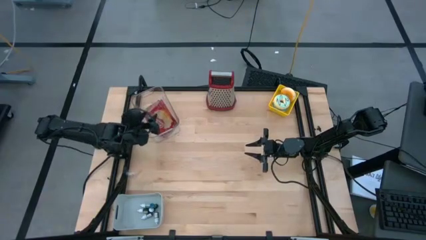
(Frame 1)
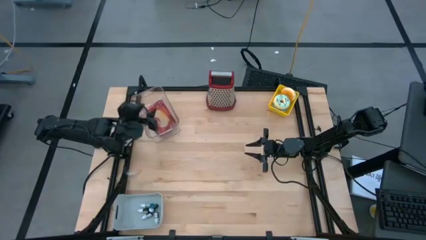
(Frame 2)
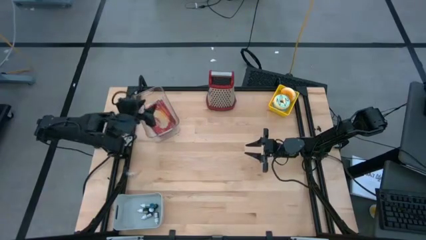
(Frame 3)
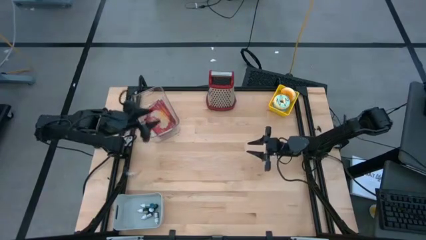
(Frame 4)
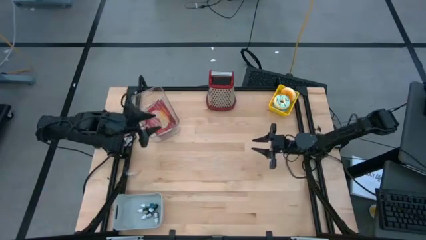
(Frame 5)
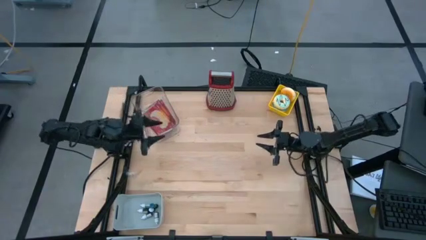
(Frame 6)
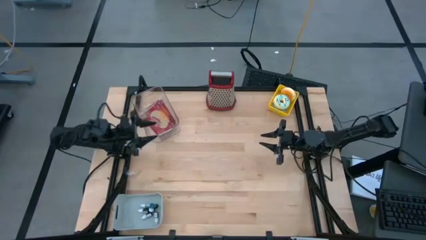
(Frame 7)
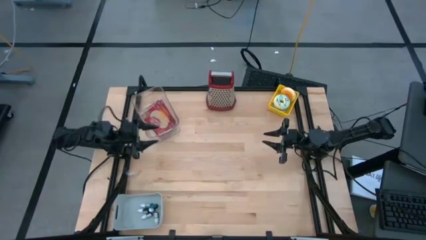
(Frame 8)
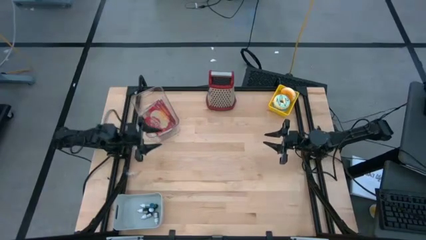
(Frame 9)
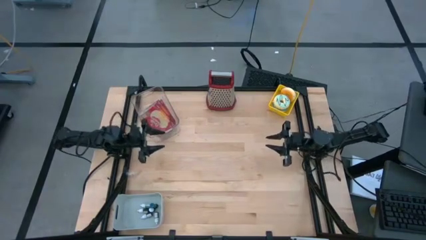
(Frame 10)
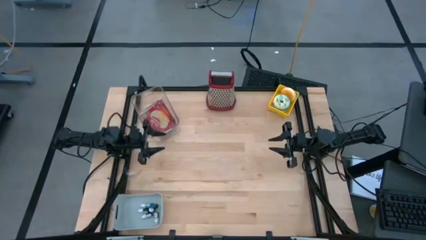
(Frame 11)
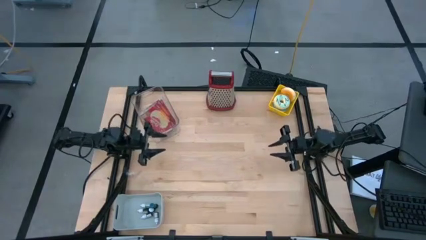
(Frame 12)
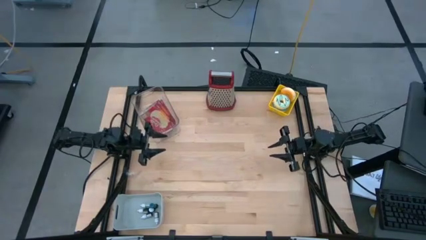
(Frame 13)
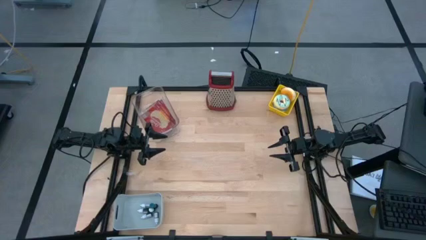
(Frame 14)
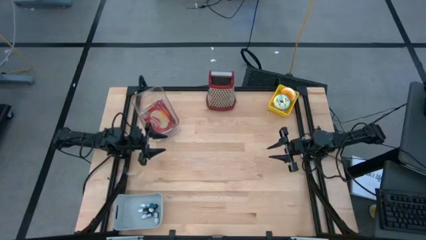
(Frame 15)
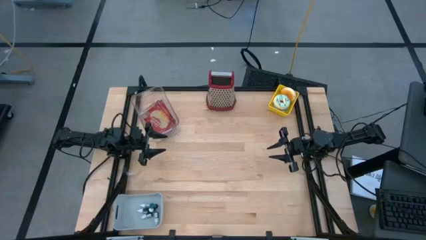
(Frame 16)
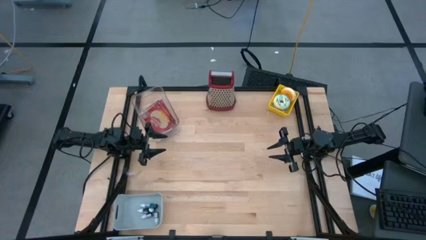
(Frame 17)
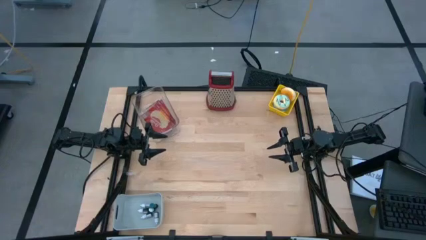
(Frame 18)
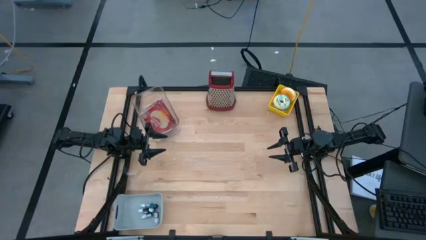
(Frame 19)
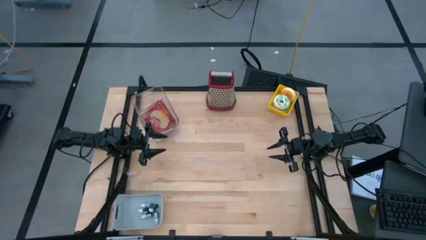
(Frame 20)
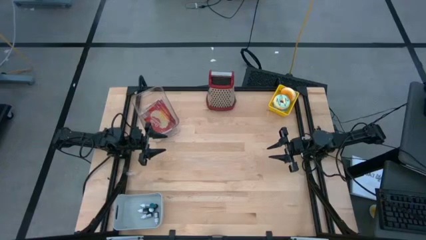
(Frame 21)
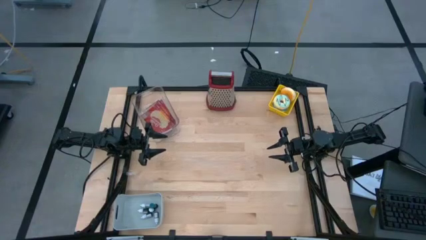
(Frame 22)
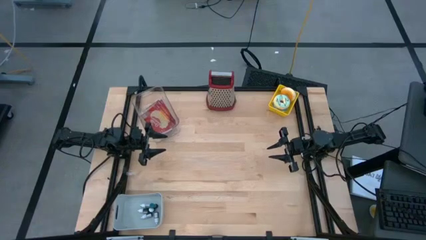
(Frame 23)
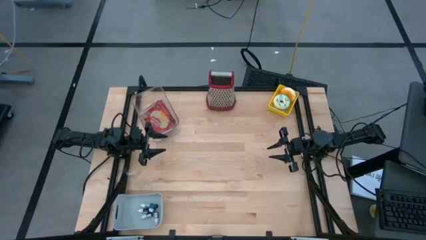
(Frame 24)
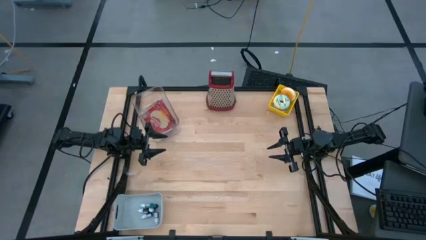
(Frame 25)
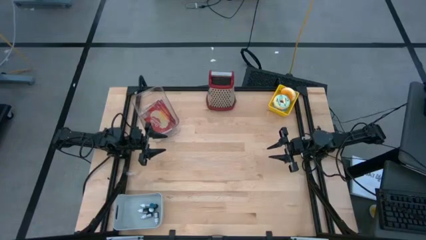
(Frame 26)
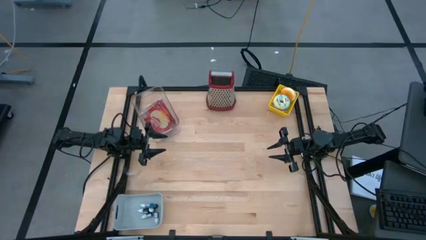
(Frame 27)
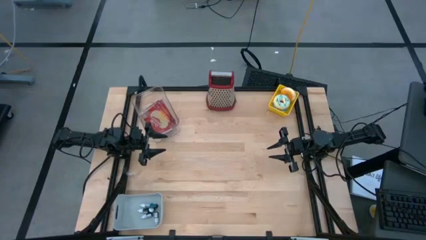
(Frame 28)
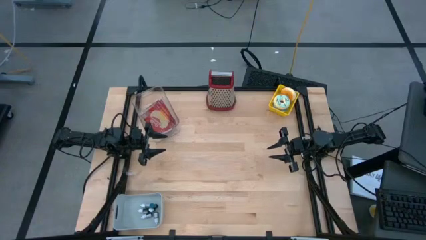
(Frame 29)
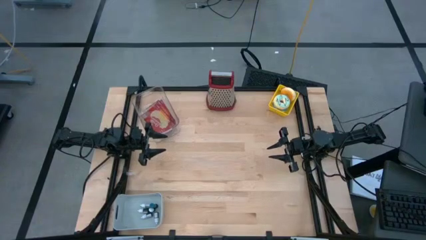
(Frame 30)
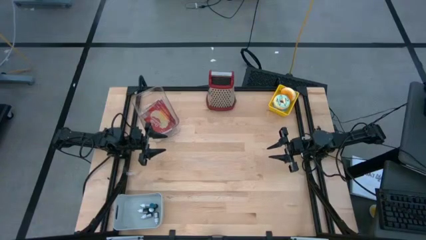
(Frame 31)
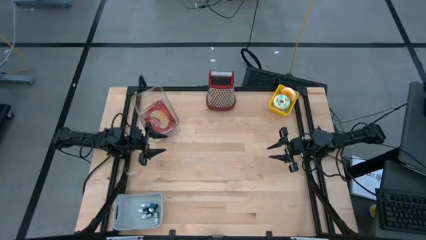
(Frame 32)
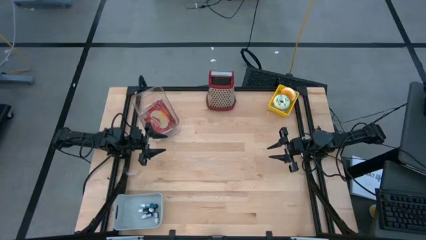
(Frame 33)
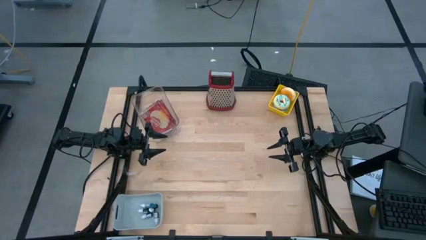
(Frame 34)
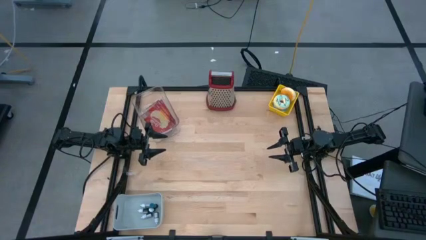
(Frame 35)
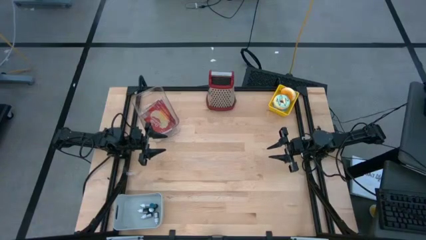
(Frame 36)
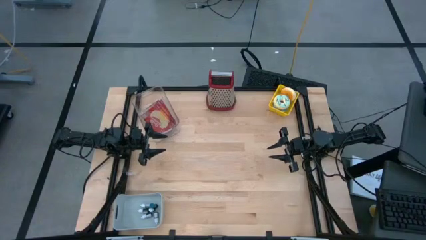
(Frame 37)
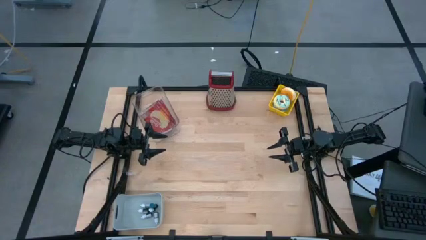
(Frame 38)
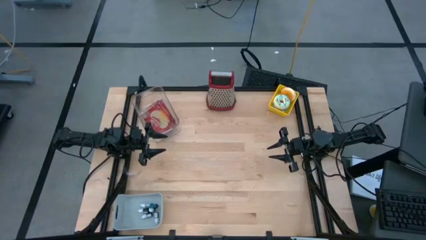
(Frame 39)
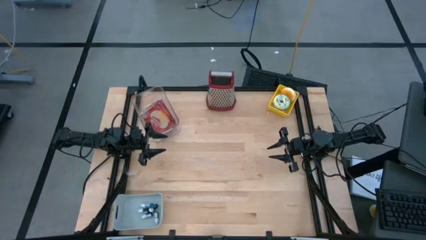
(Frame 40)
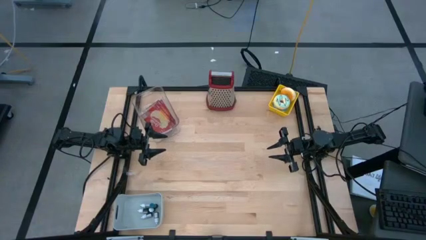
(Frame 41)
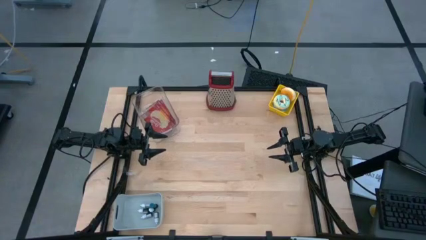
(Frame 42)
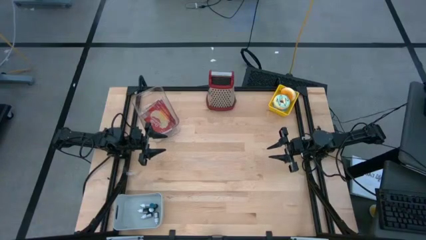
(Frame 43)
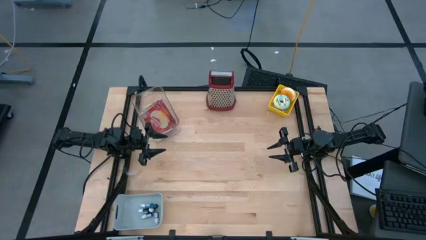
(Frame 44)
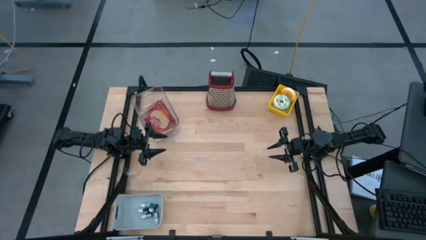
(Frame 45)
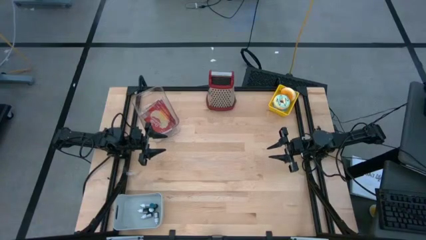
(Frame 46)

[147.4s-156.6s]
Return to Home Position
